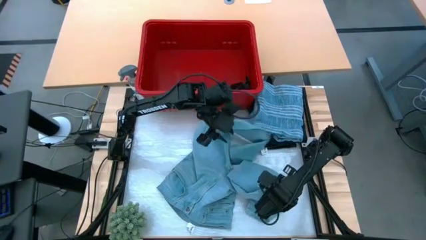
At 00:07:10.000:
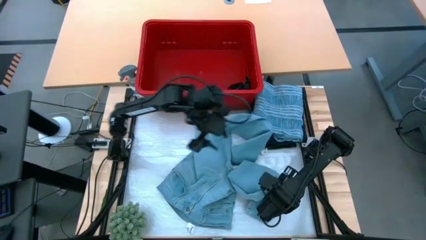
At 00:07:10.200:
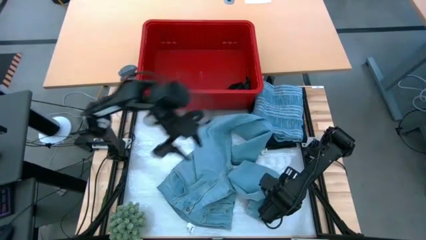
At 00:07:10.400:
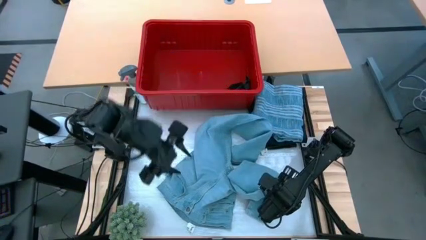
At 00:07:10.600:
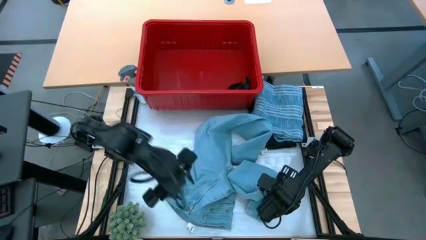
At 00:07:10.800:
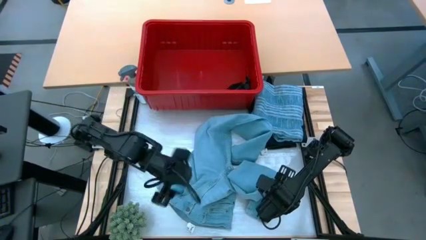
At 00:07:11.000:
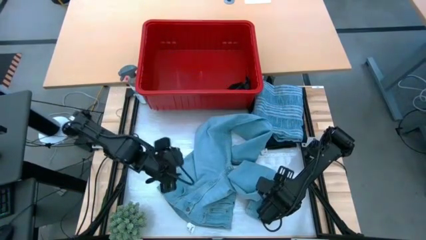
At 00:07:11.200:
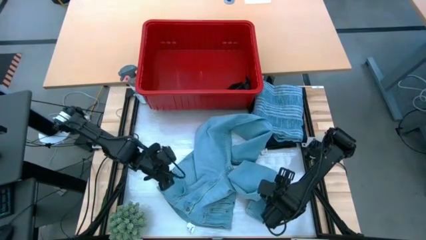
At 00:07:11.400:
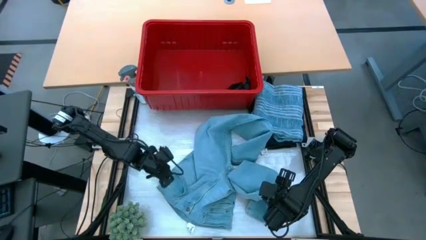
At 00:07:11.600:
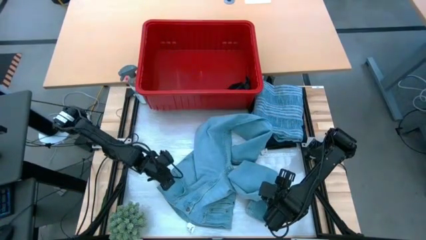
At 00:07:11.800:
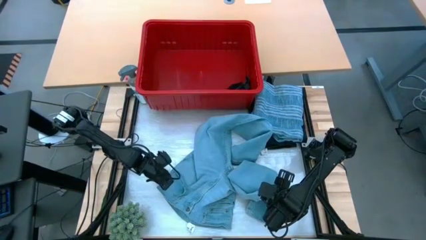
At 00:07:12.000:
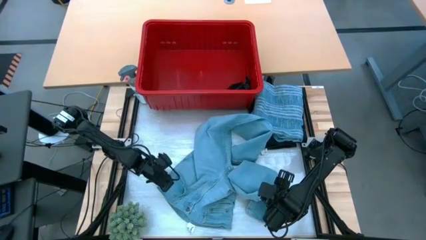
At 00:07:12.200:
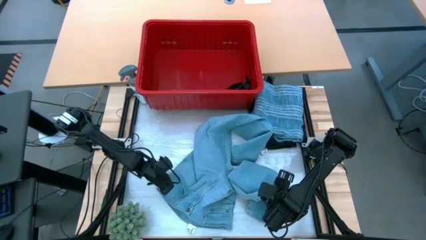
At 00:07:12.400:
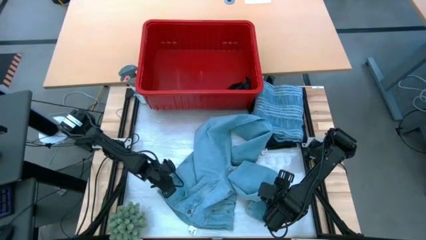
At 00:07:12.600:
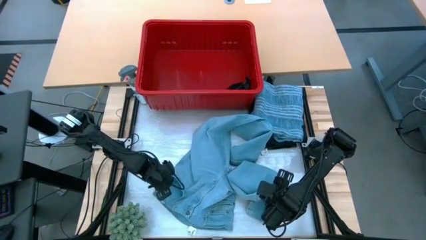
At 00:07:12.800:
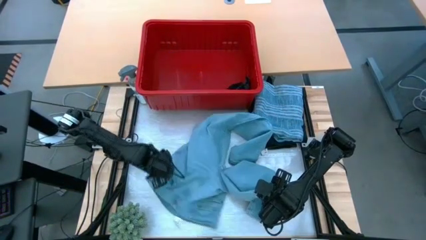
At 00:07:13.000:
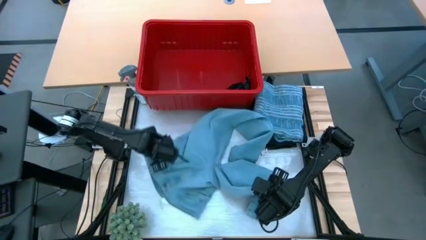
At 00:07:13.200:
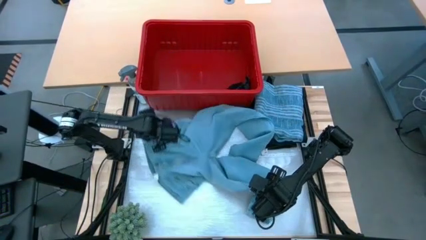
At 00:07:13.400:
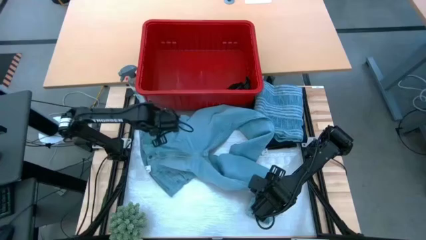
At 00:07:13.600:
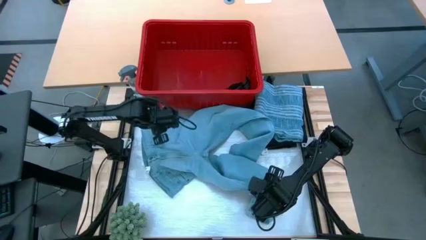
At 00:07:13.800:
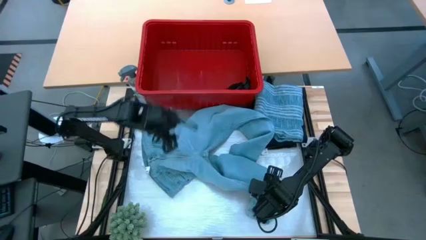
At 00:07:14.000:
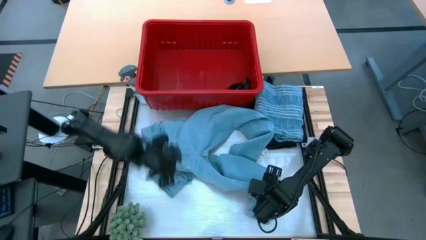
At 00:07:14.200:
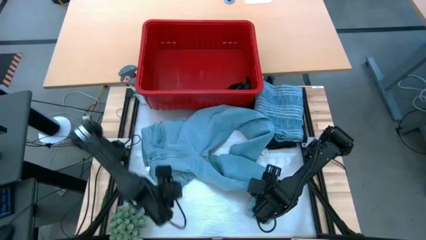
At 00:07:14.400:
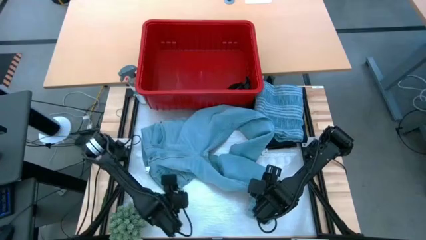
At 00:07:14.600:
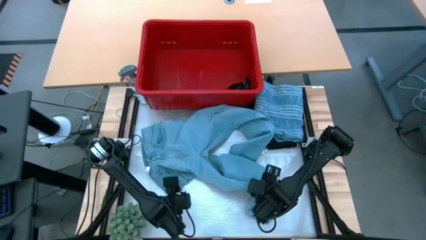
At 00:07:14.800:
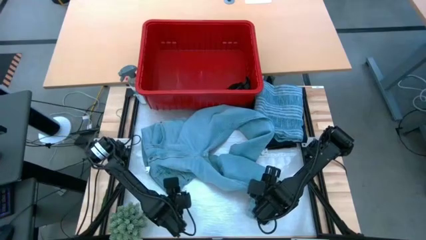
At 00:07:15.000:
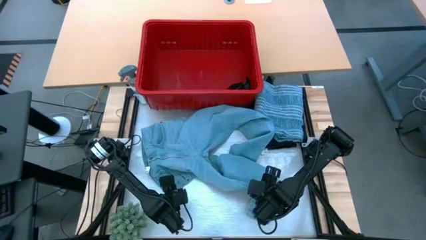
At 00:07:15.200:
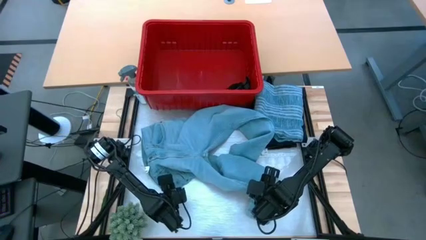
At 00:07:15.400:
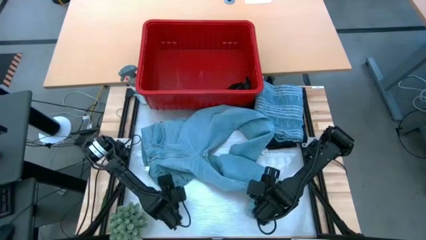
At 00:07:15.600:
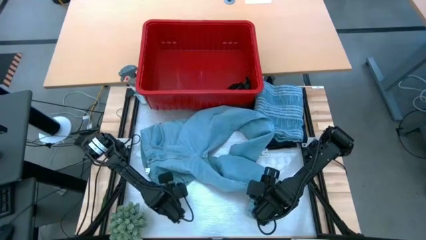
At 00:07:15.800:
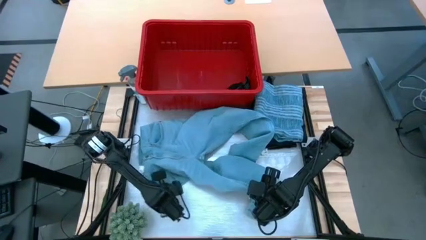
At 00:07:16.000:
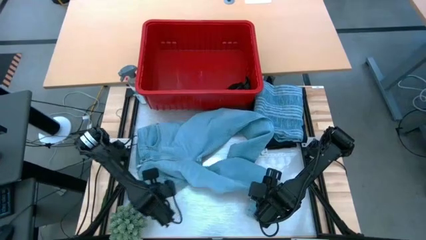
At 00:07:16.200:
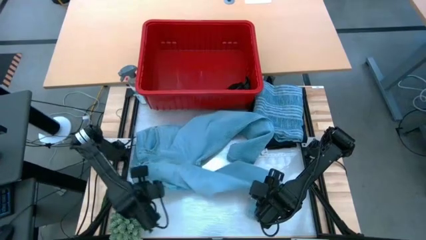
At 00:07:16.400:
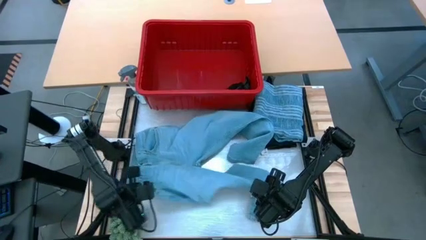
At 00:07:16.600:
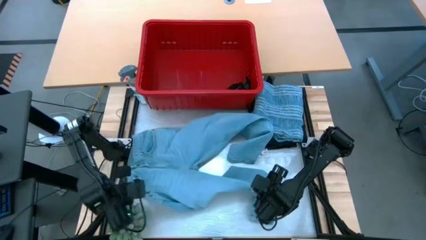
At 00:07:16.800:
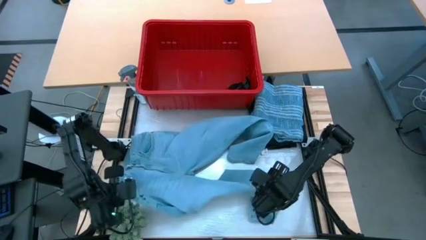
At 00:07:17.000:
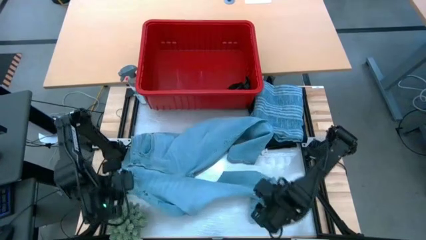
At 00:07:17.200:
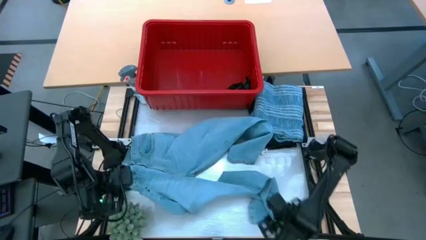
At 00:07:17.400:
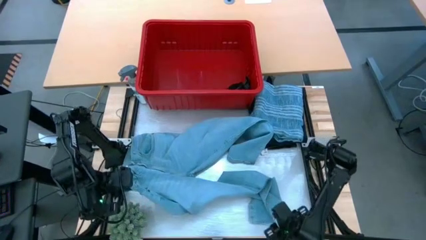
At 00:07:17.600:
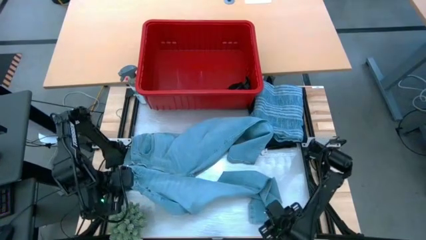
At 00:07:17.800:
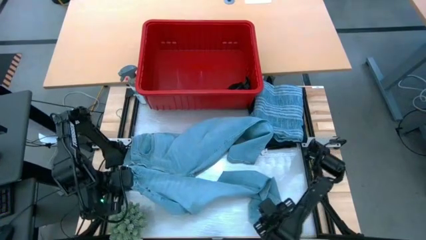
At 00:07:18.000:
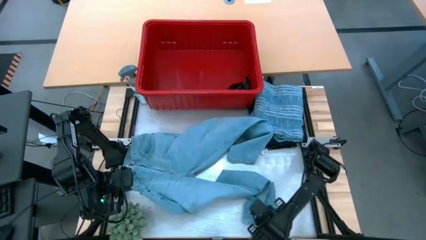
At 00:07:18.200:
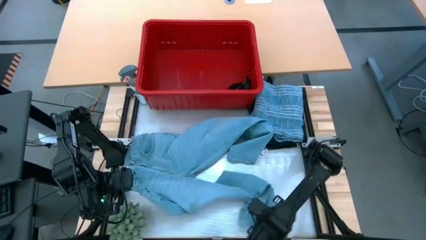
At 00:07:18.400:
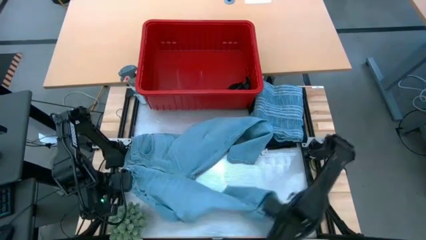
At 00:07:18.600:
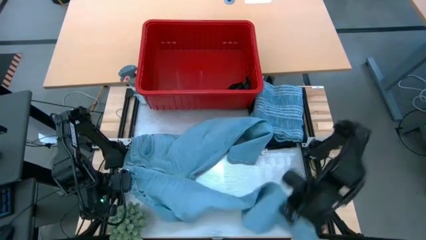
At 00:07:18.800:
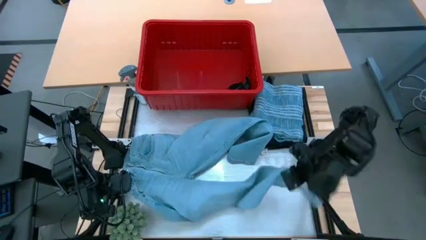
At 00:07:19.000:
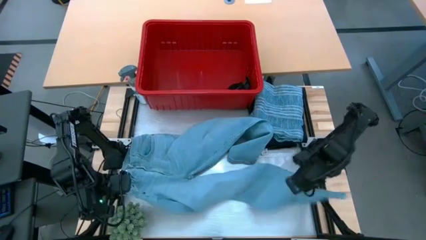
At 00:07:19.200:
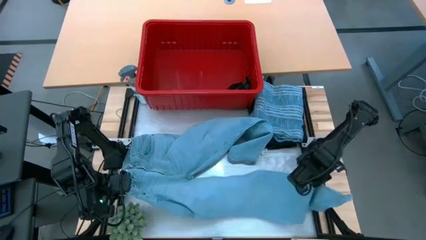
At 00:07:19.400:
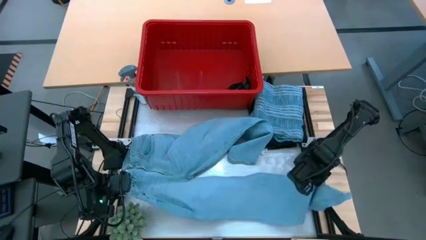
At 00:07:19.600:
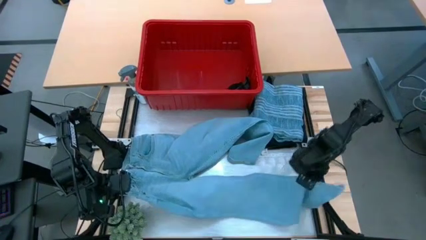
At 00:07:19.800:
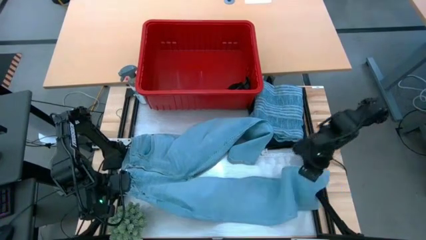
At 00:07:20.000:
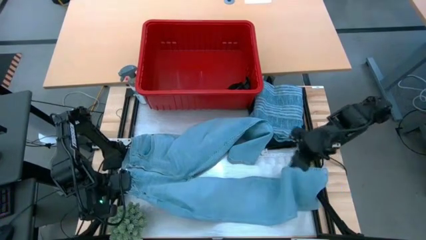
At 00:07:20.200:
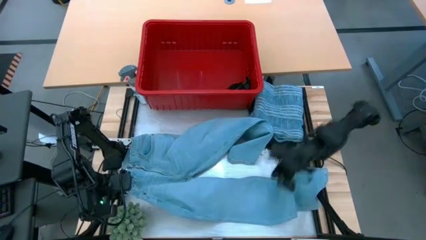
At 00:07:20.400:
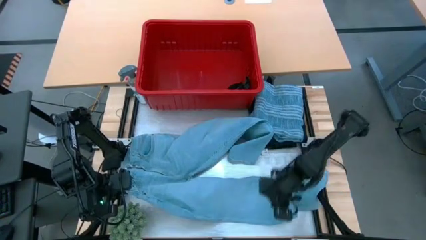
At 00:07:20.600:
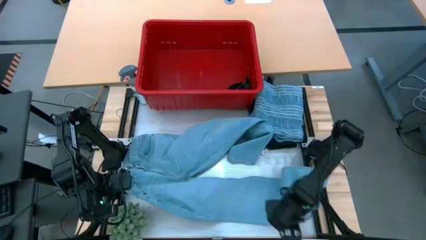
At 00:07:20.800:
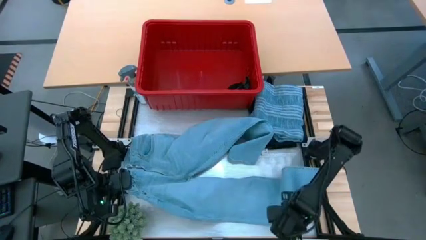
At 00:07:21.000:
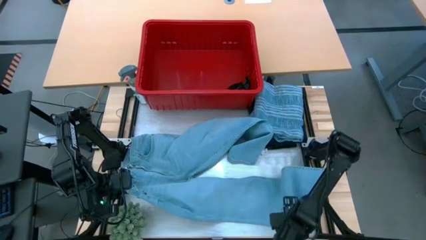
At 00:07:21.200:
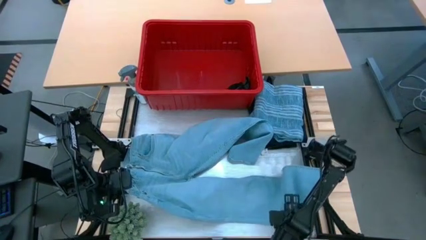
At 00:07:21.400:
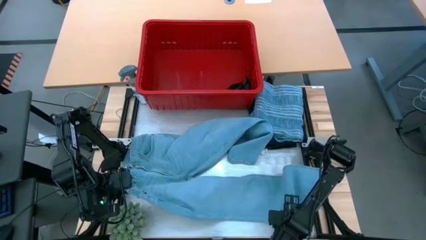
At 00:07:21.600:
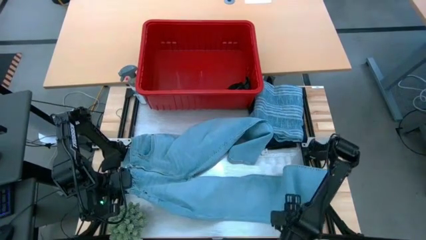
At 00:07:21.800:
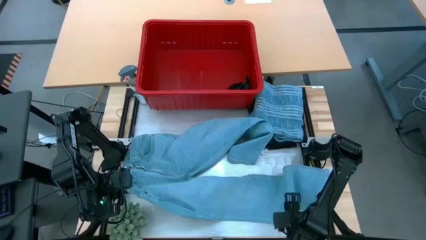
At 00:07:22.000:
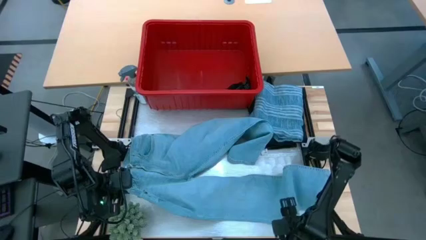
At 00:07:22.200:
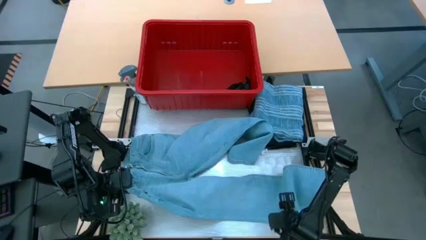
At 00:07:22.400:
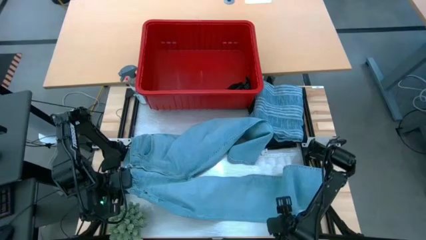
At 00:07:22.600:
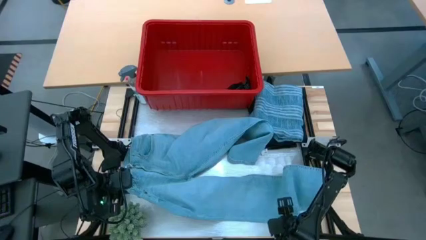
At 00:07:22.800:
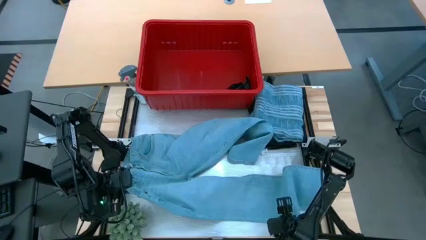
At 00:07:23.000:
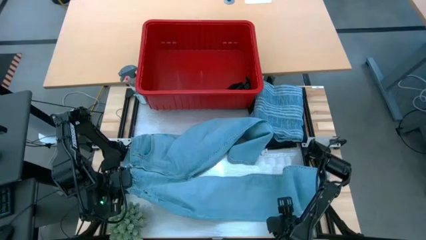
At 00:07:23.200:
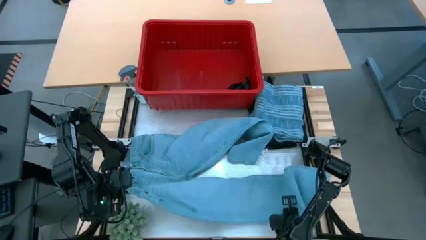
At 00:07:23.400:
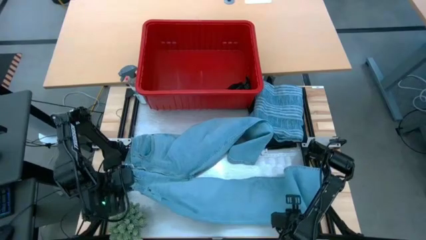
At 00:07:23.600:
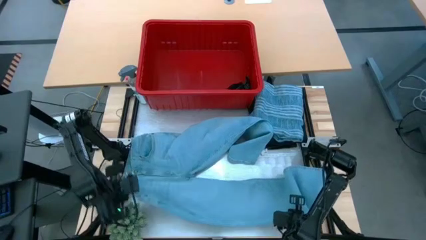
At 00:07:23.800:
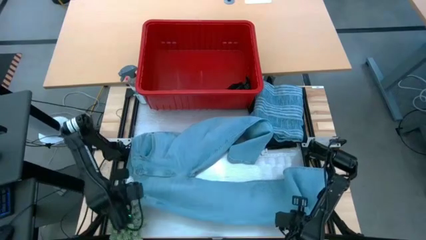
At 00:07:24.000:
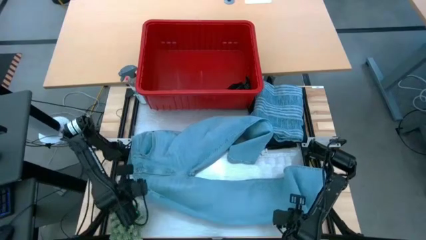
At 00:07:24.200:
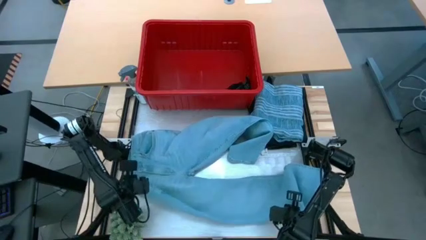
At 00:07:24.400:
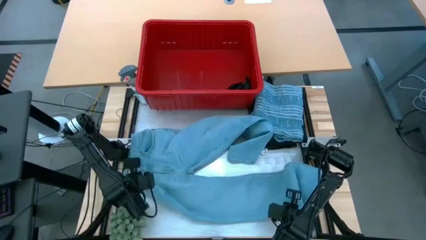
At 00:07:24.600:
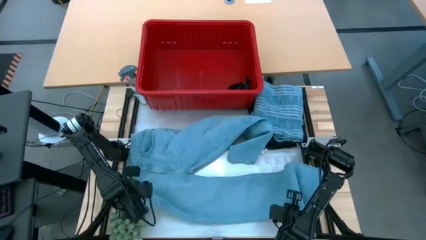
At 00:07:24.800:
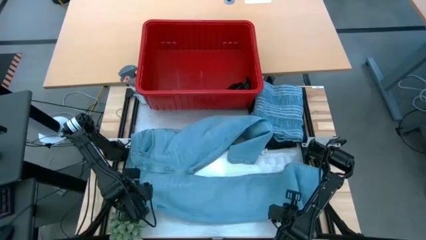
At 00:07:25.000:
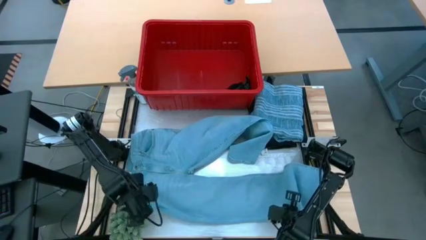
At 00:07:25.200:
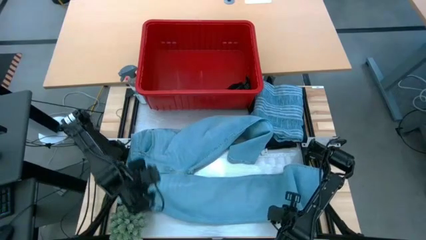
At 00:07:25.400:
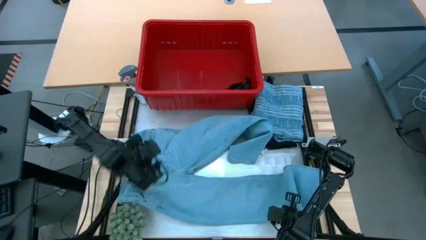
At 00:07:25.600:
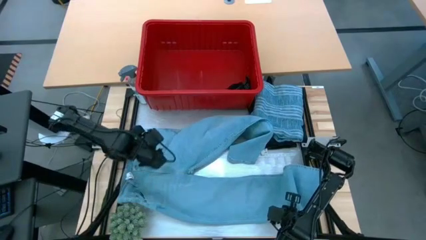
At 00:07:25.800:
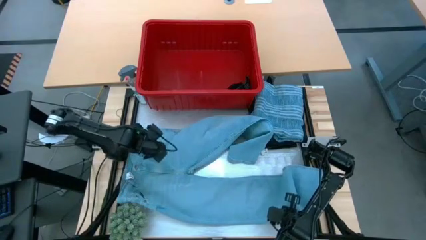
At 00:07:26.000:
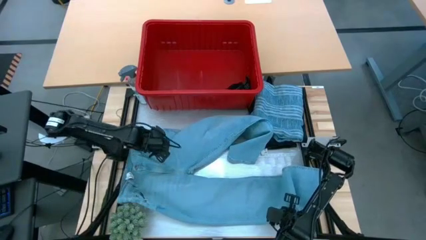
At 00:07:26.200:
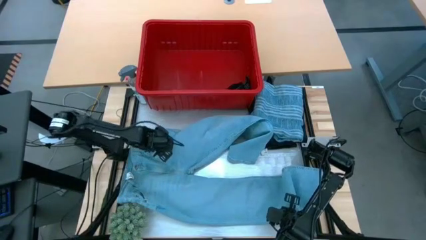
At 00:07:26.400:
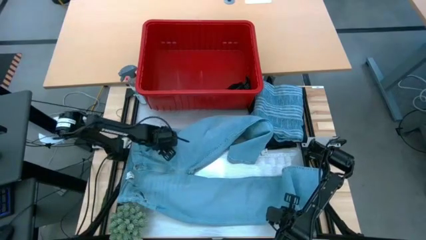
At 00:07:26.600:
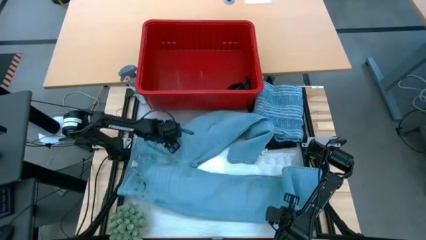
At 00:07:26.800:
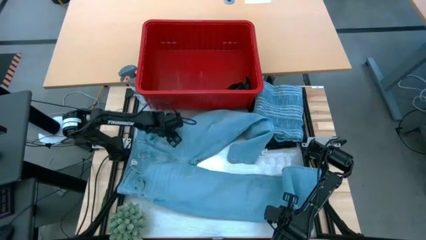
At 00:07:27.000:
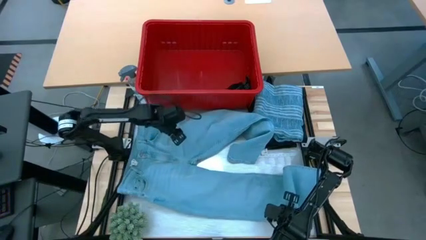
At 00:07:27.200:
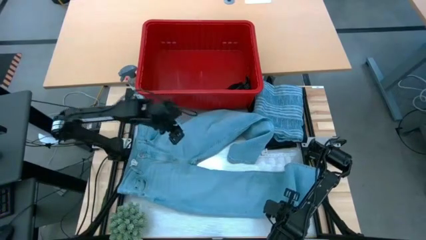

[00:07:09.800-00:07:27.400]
Task: Fold Laundry from Bin
Fold the light blue pants
